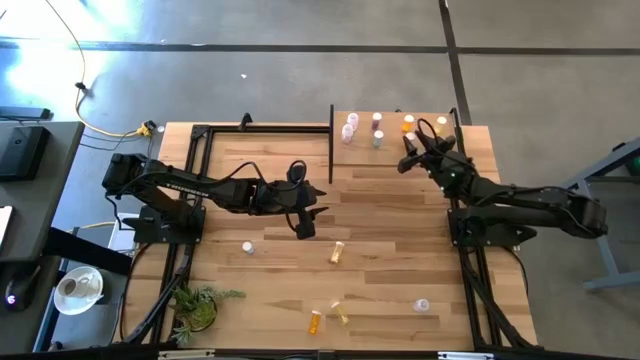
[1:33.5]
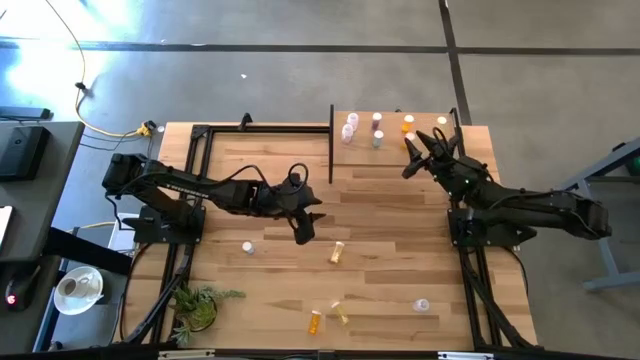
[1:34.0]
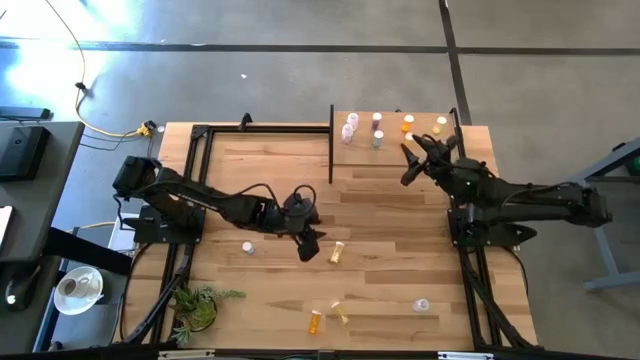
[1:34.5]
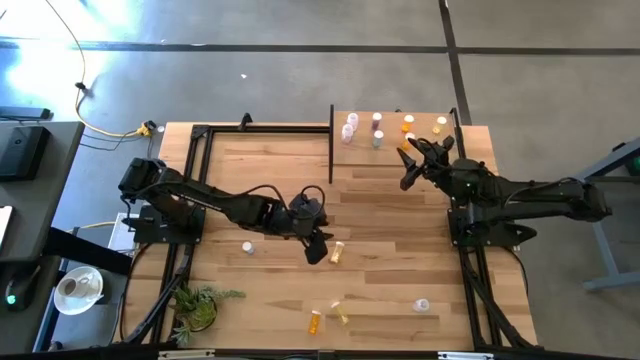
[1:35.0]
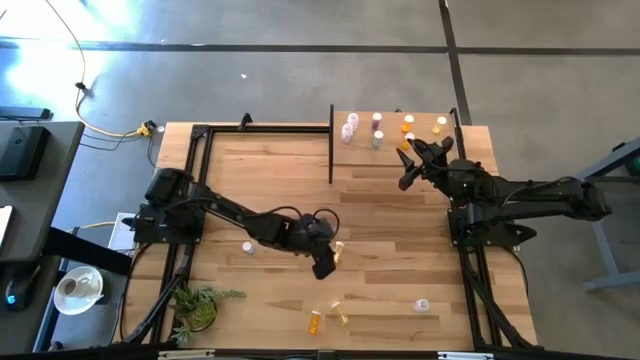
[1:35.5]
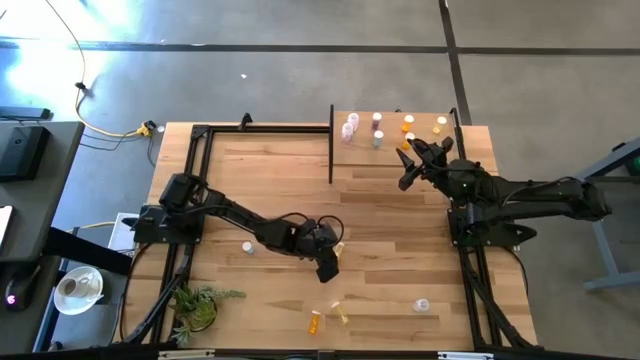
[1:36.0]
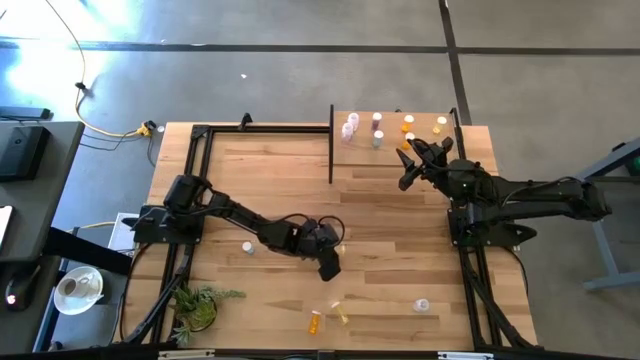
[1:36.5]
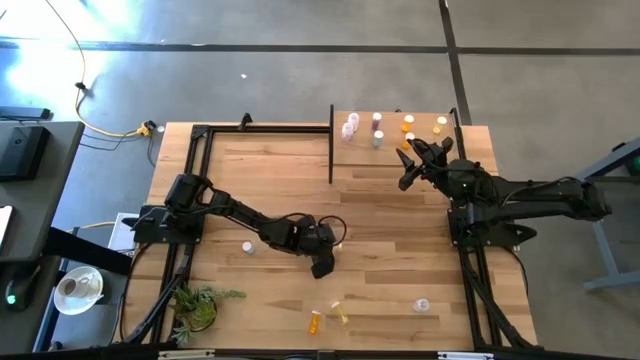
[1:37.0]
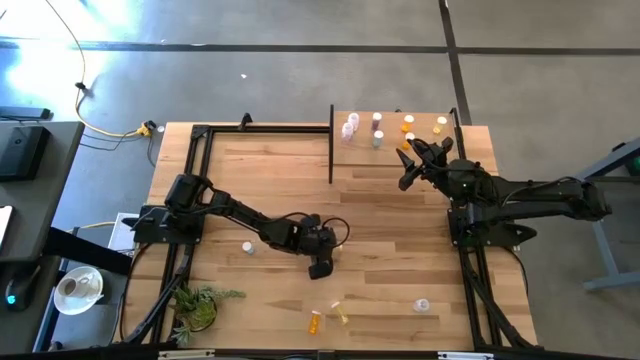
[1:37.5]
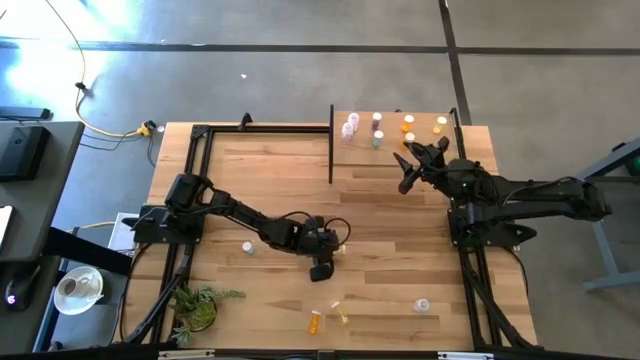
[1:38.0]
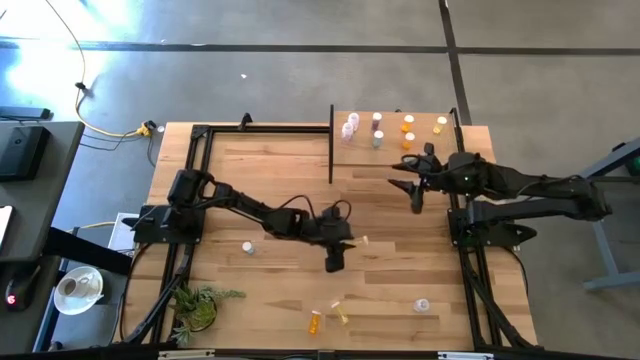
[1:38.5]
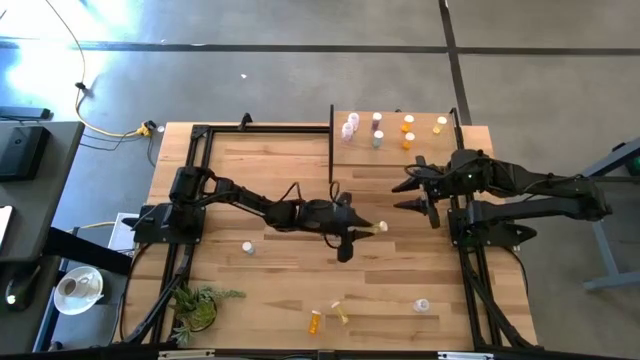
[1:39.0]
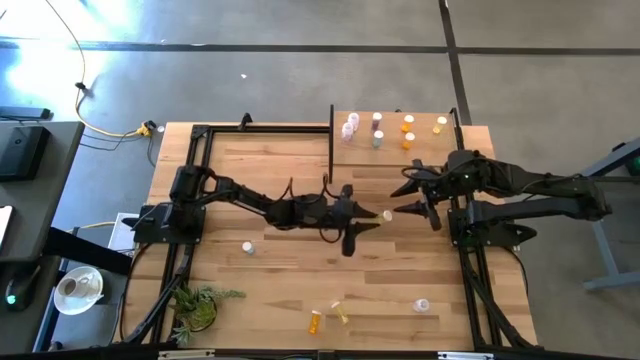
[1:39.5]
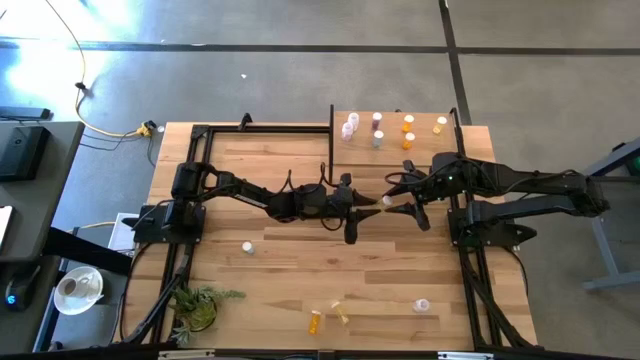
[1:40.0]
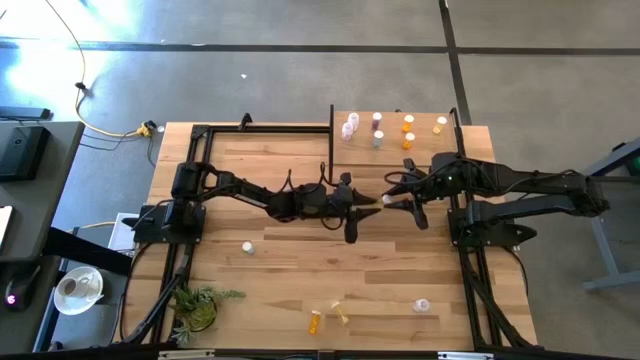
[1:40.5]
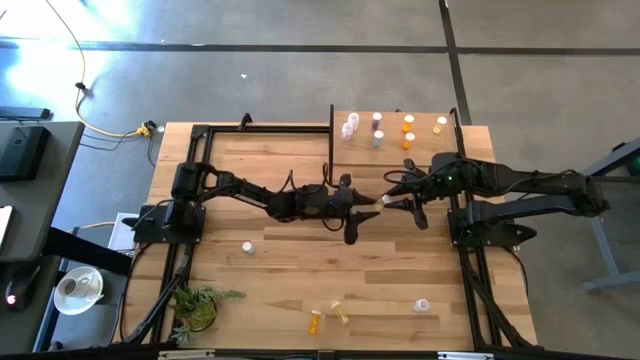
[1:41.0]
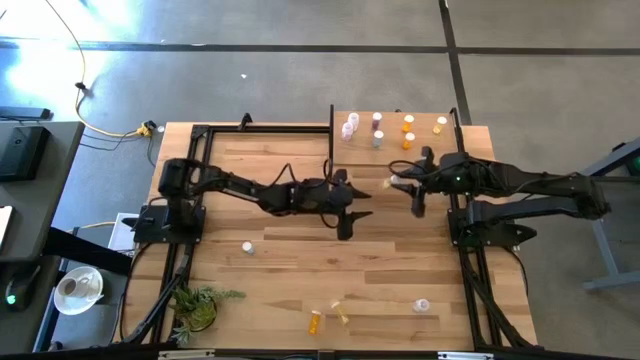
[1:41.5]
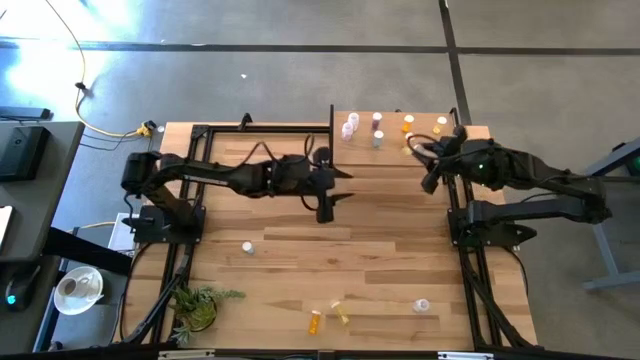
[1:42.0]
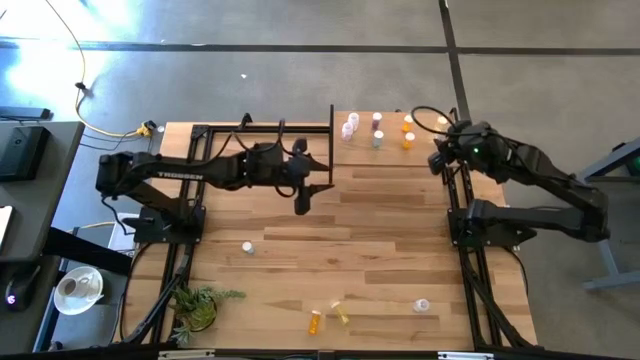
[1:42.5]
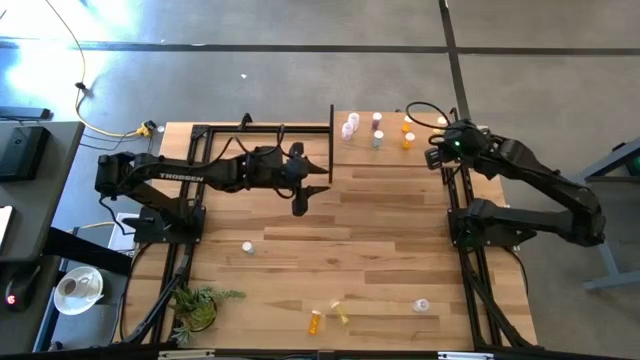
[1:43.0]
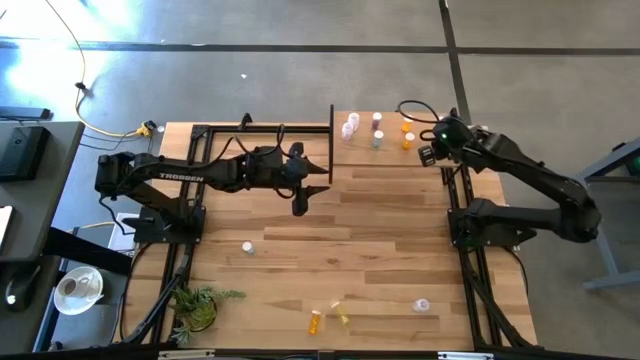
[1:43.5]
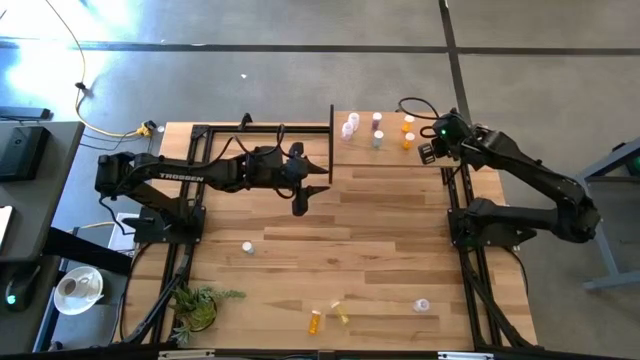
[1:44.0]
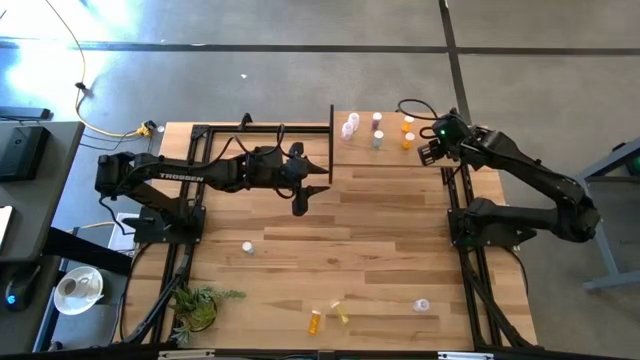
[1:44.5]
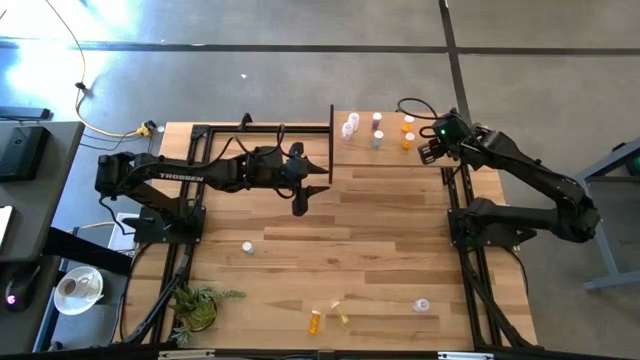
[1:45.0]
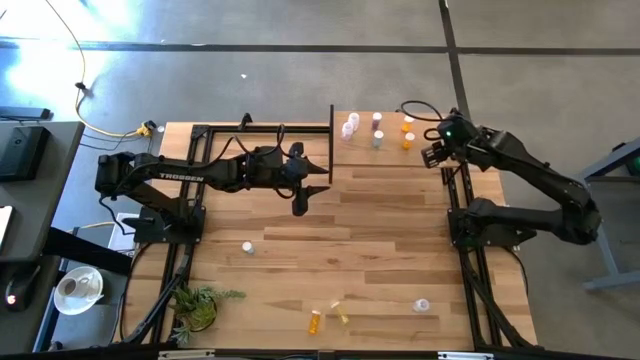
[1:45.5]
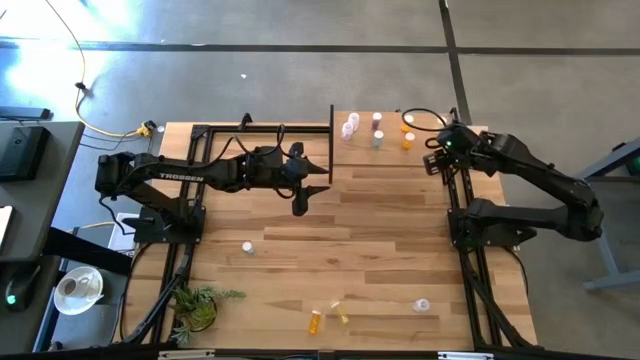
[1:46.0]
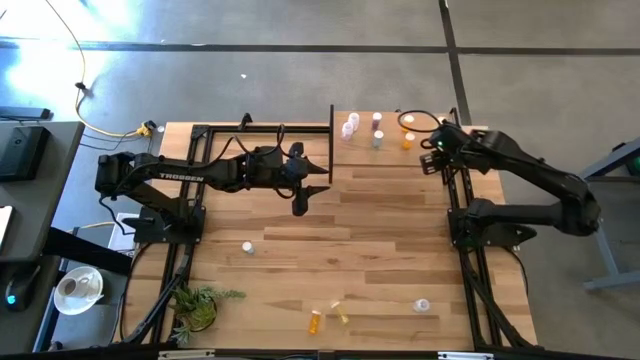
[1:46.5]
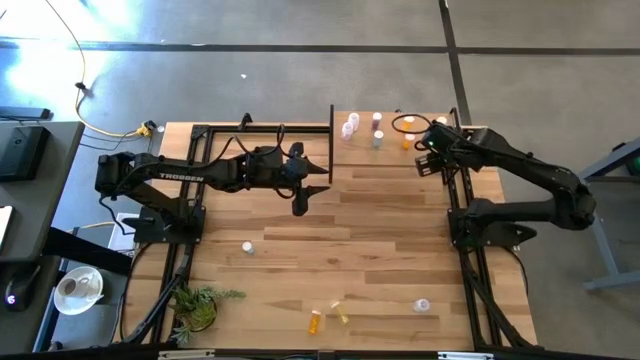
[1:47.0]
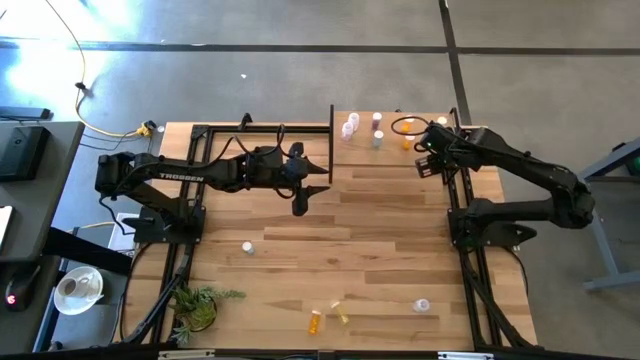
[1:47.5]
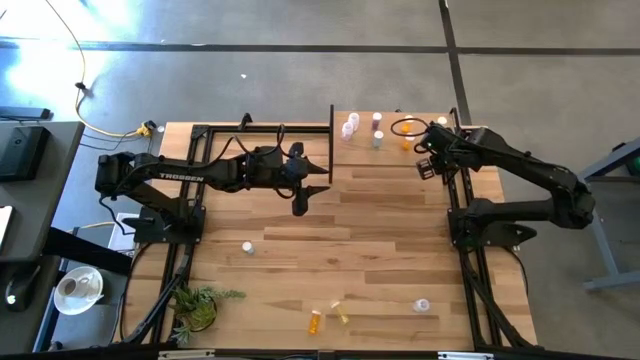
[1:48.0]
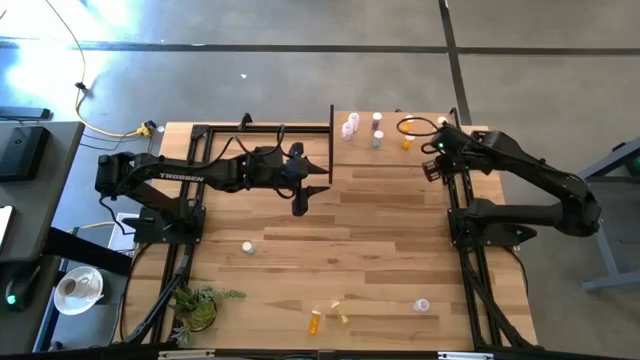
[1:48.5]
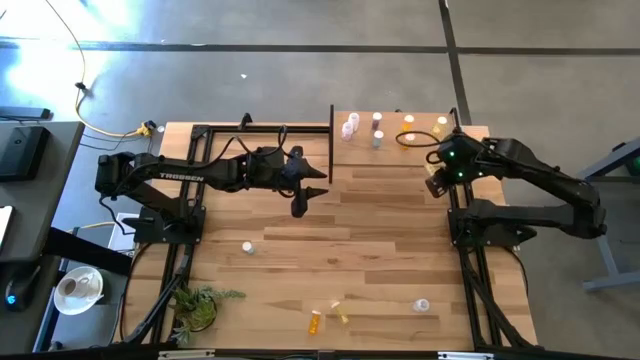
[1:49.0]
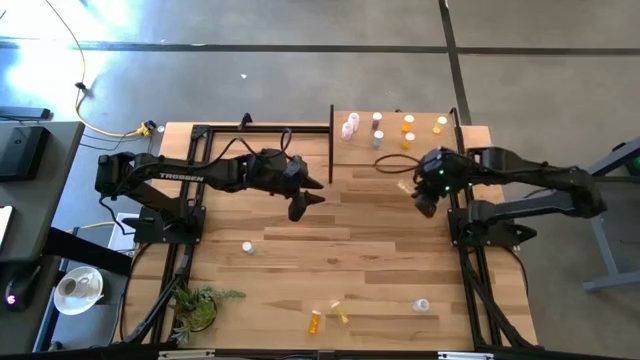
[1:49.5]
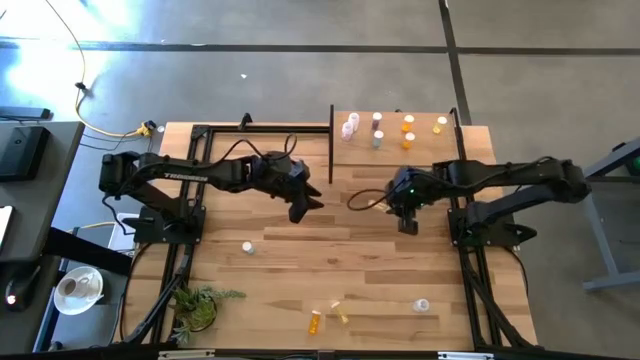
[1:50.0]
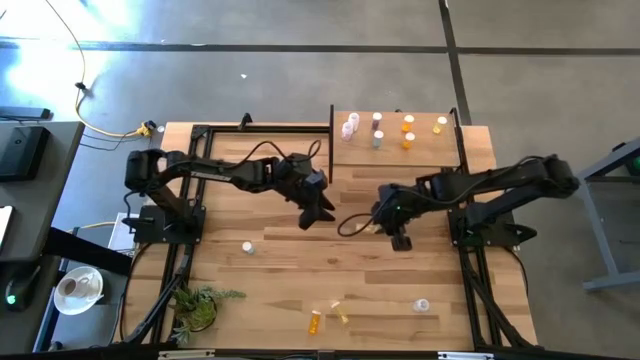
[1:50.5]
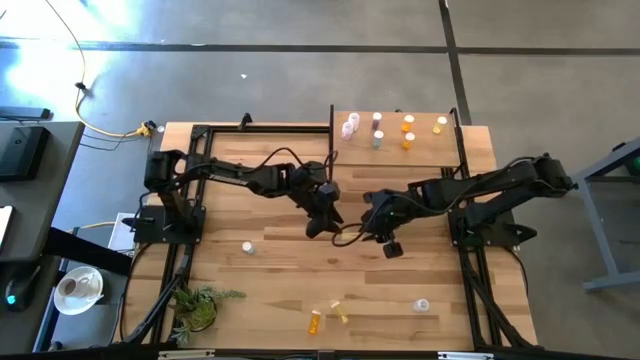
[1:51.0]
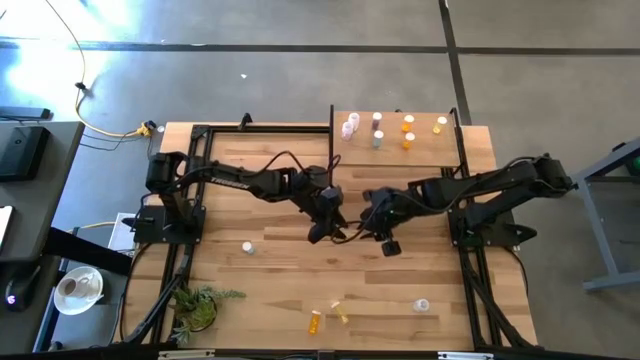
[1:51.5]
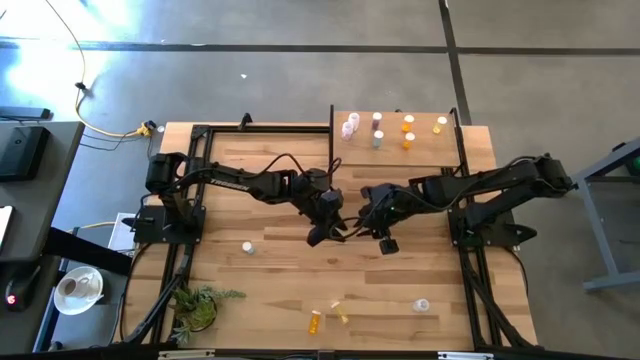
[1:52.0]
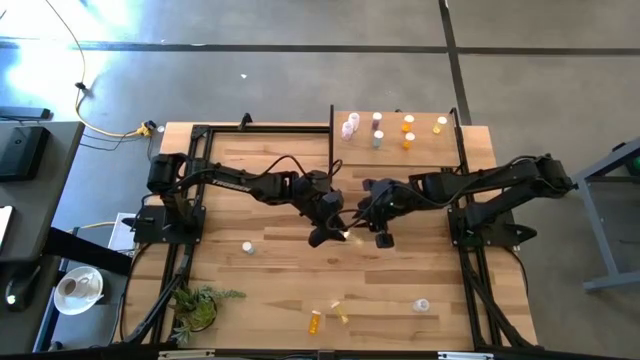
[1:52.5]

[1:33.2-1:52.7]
Task: Pick and place medicine bottles onto shelf by color
Put the top yellow pill bottle on the shelf aligned with the other yellow pill bottle

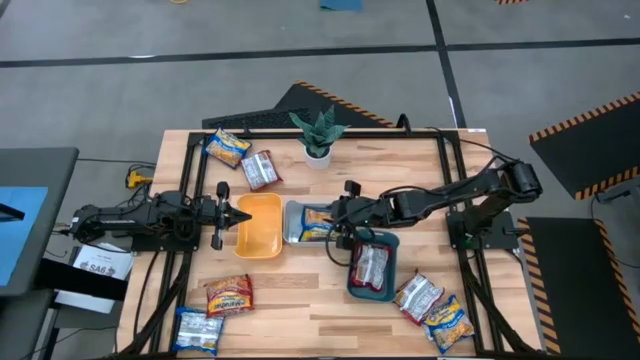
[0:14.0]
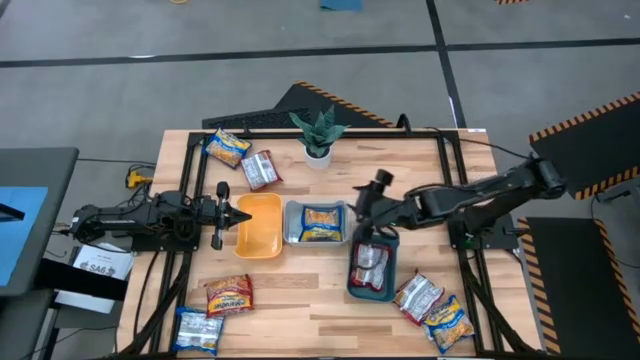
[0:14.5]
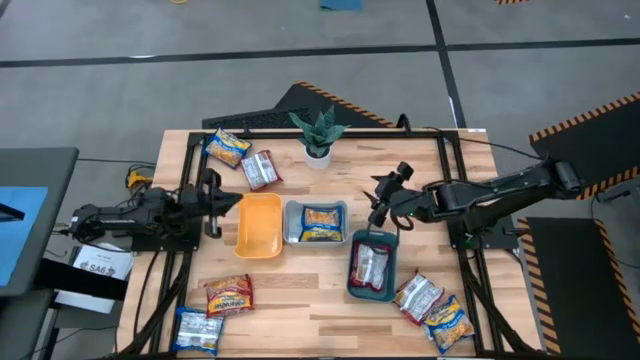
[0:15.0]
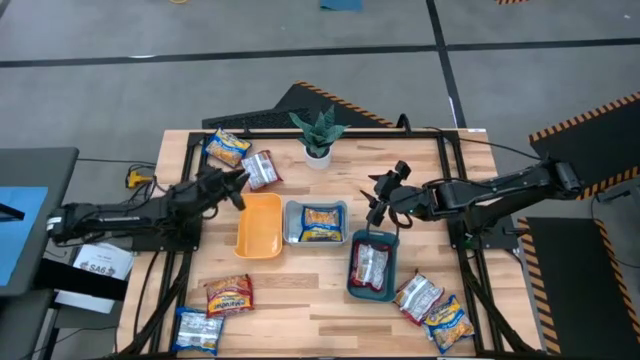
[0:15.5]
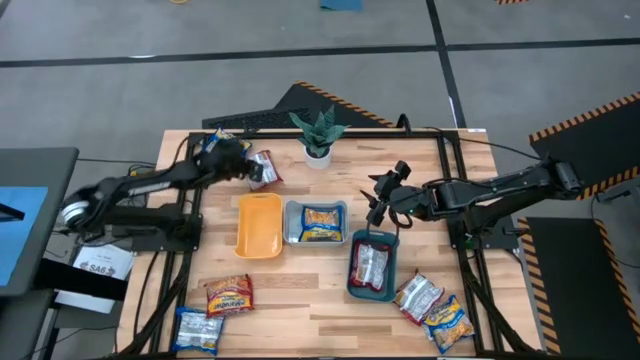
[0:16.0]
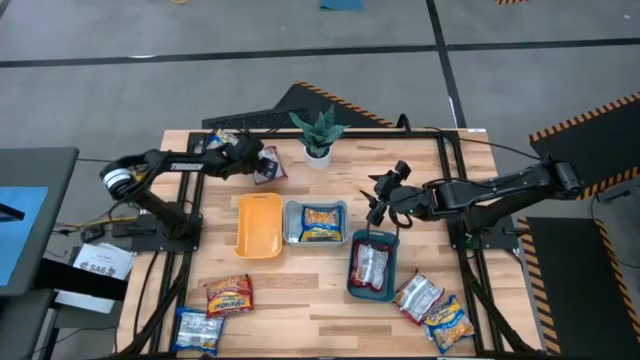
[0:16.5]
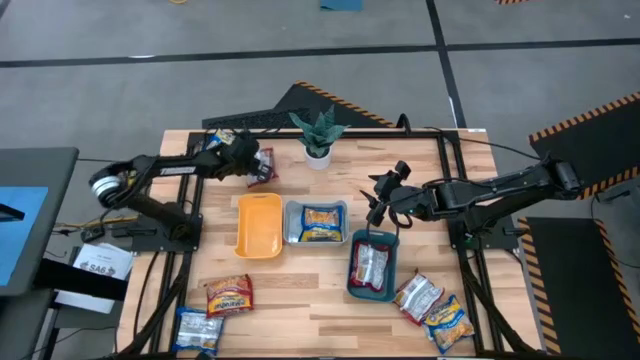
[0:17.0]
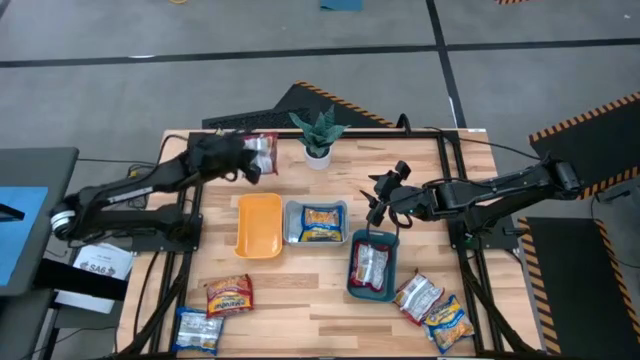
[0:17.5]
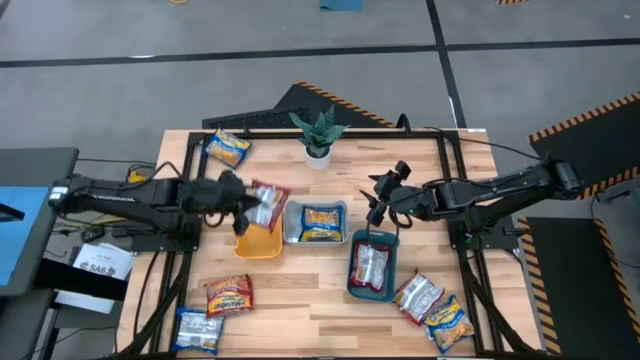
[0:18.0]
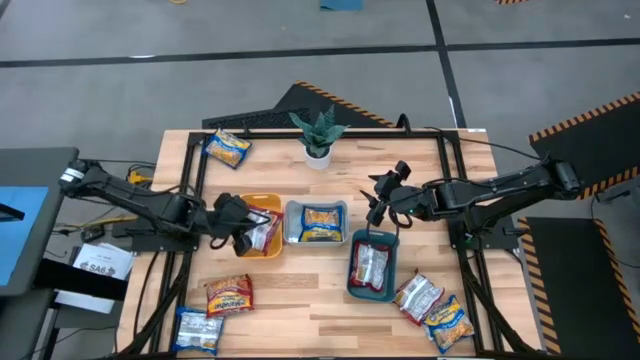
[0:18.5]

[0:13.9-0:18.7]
Task: Sort Maruchan noodles
Put the top left red noodle pack into the yellow bin
